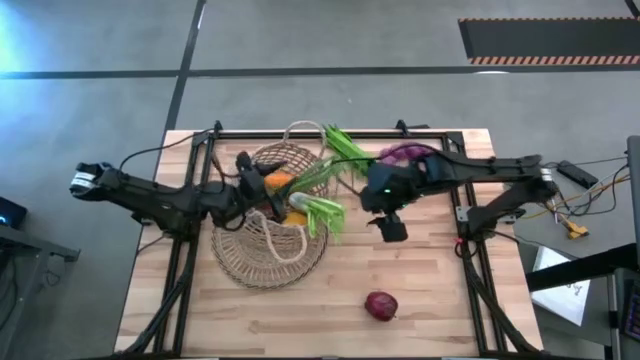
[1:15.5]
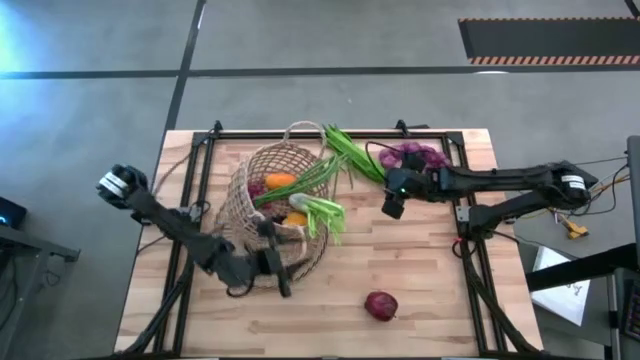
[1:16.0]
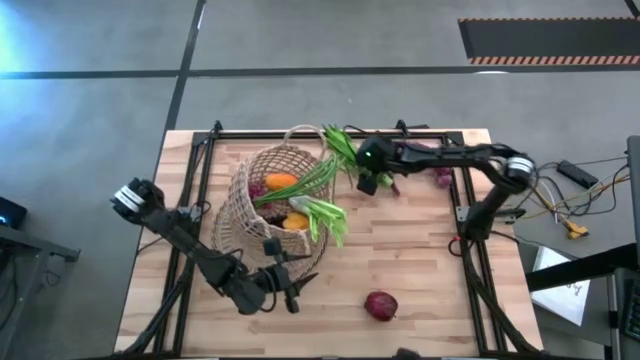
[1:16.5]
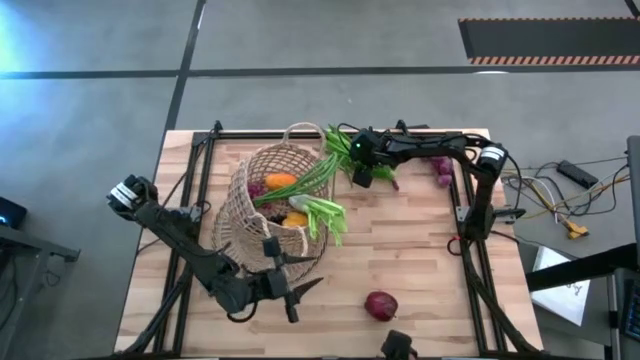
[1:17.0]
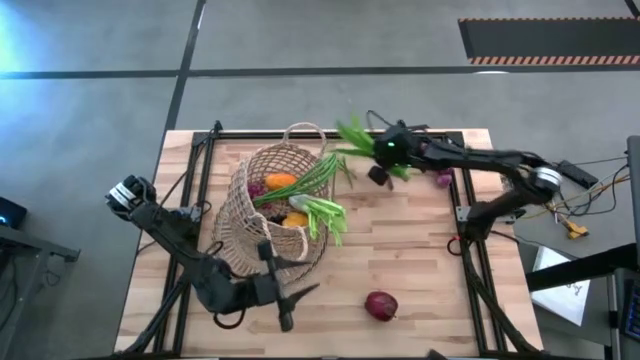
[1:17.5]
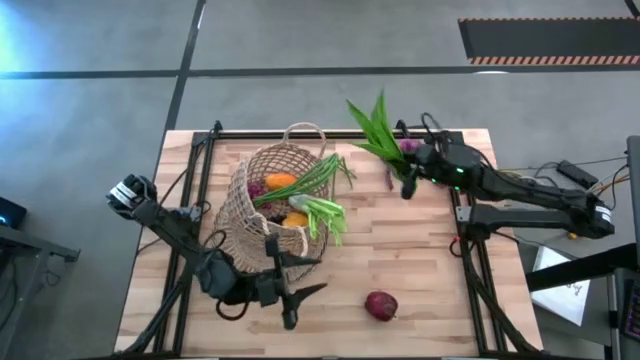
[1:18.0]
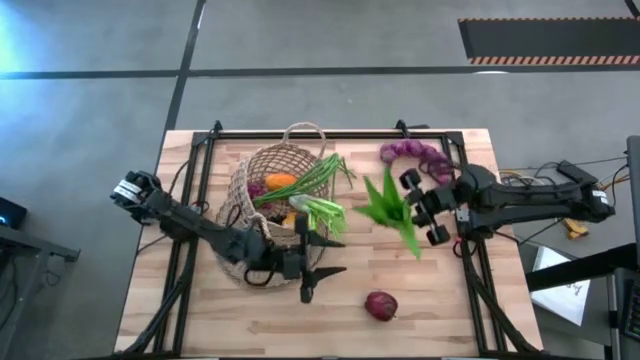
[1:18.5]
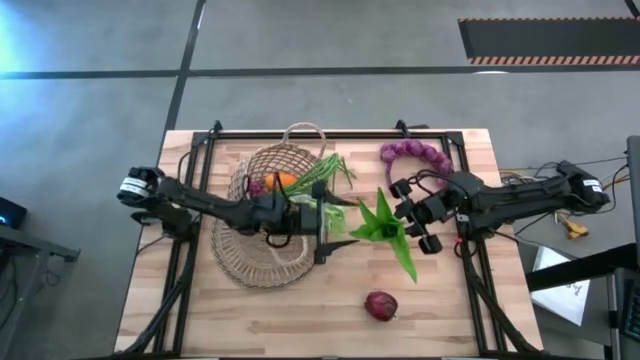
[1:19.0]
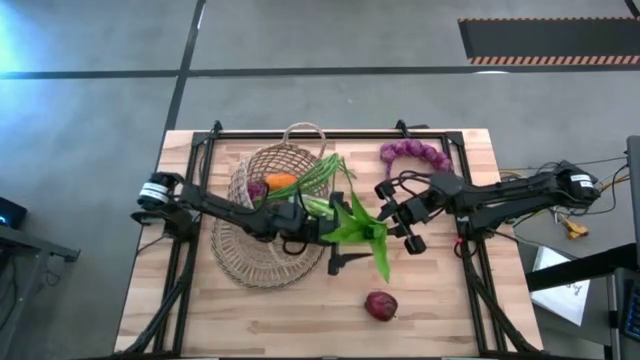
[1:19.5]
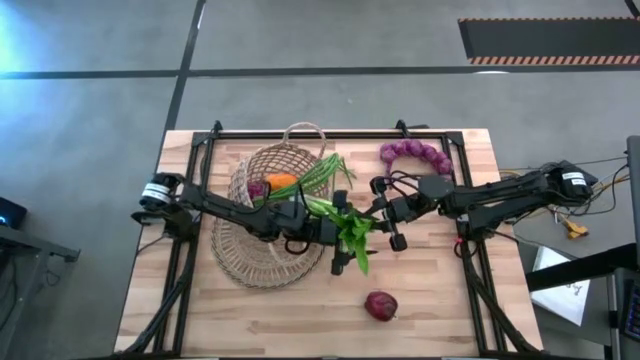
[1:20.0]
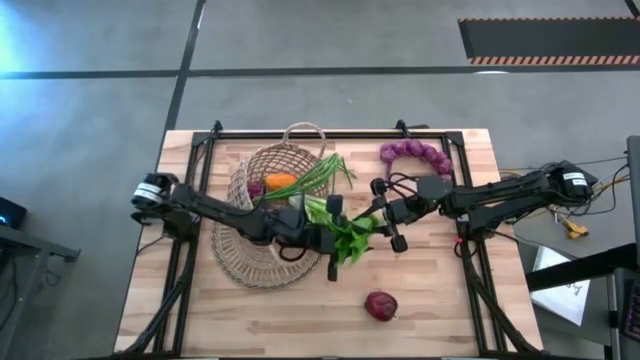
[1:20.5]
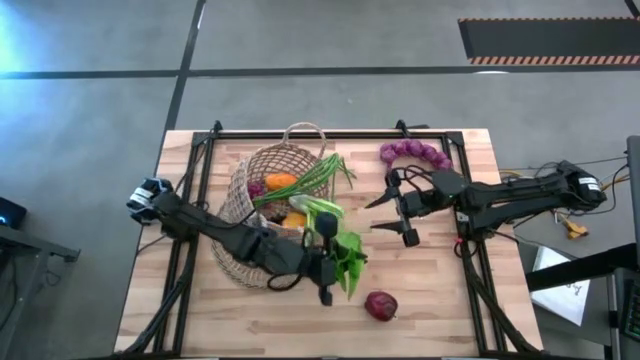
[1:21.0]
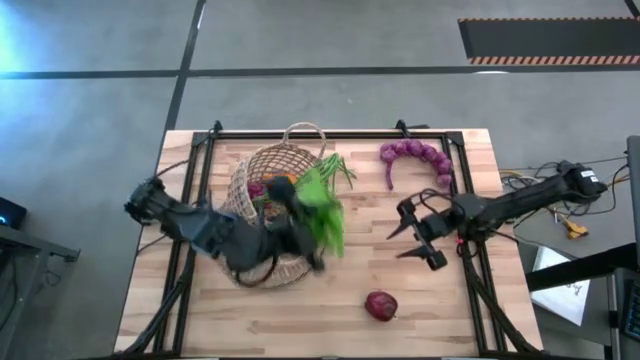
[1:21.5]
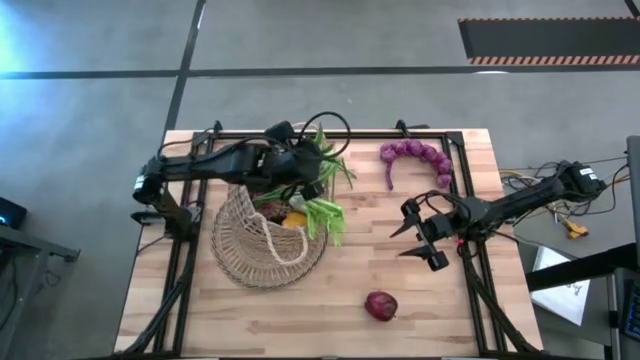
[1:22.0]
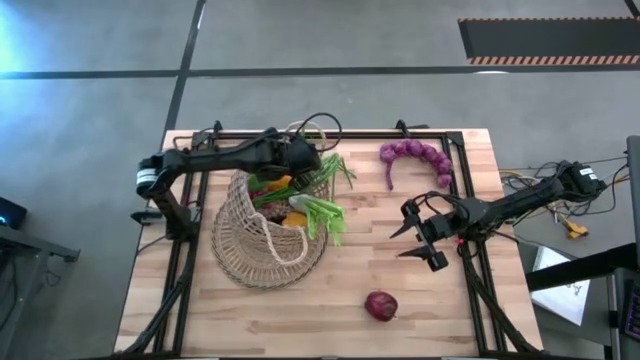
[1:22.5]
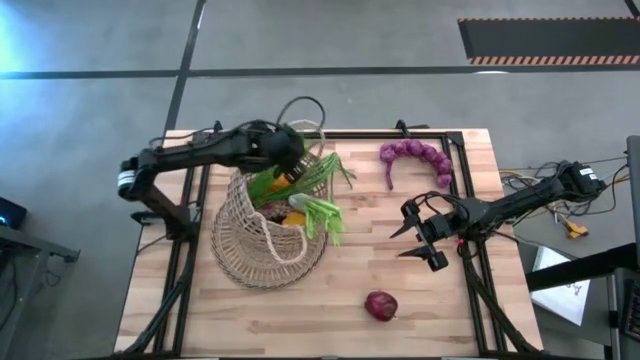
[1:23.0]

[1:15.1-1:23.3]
Task: Build produce basket
Put the lettuce into the basket

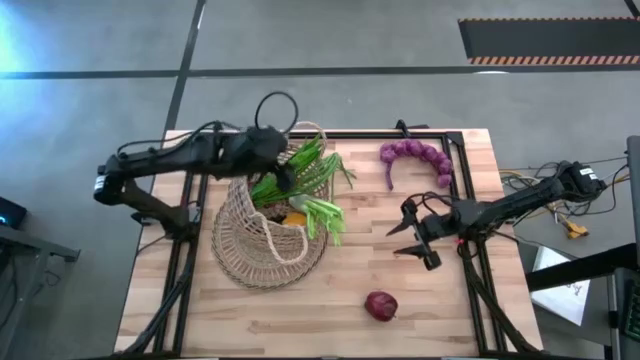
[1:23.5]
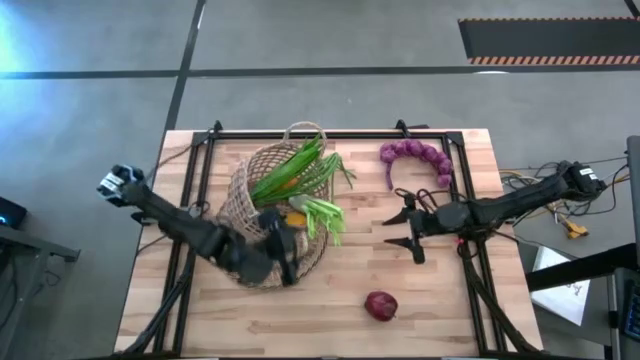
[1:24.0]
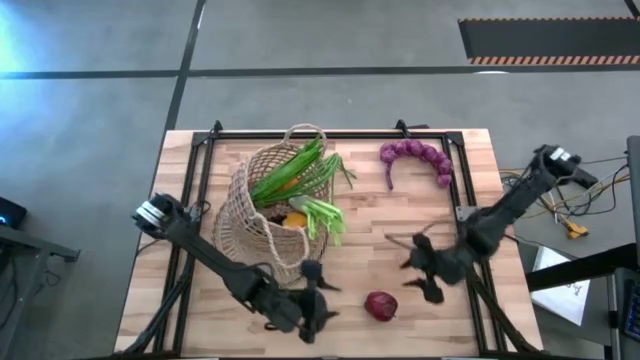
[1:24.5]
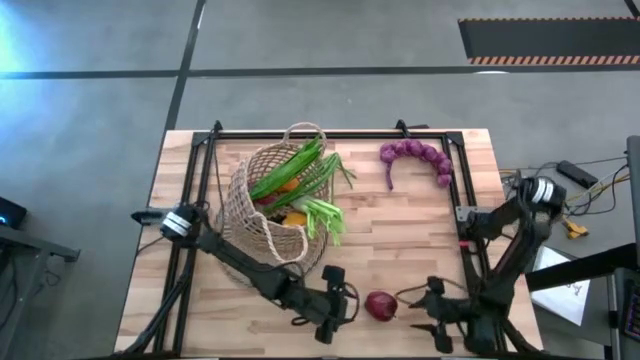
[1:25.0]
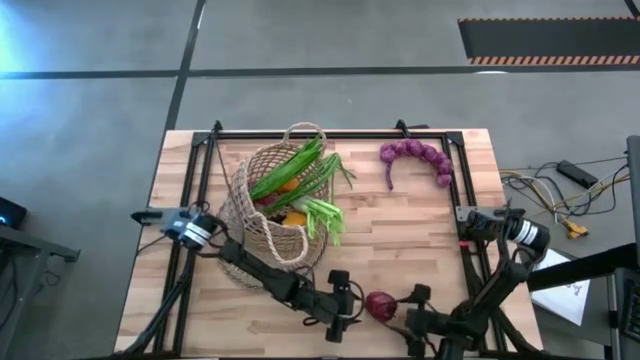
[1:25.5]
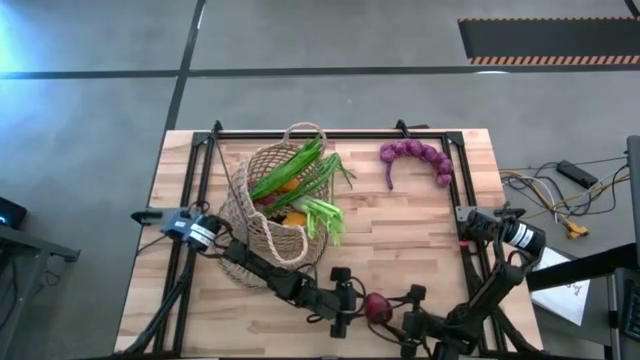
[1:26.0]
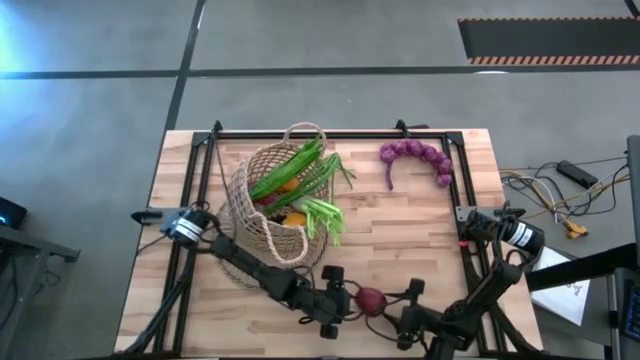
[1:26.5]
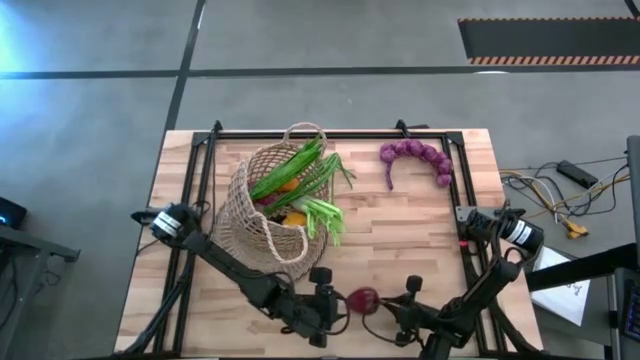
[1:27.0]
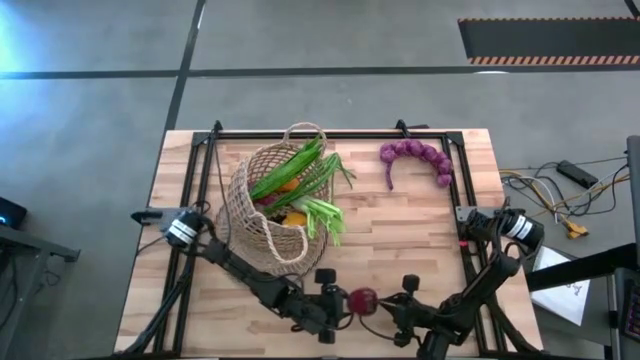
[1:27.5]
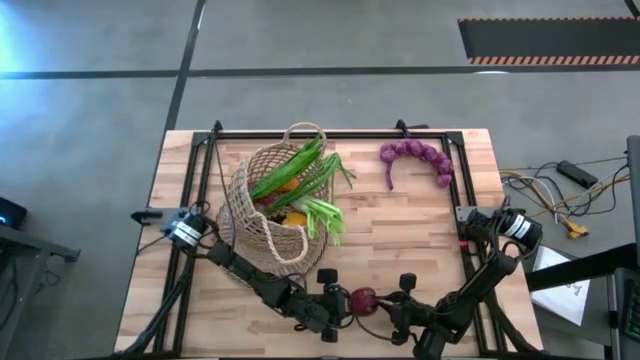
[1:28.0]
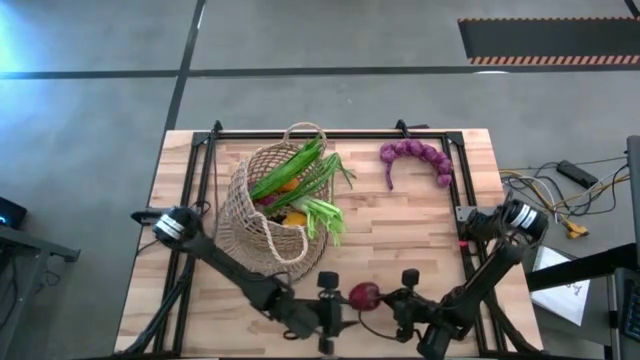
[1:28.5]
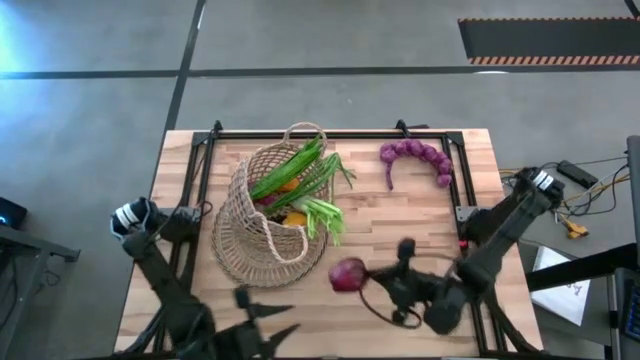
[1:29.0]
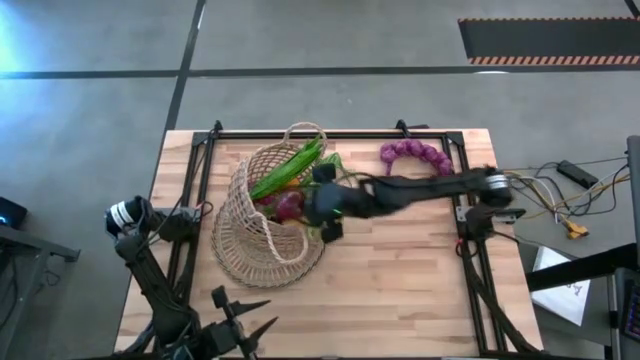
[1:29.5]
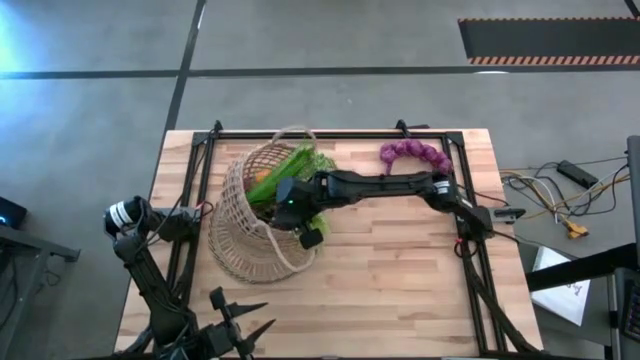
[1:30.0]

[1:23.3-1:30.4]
Put the apple into the basket

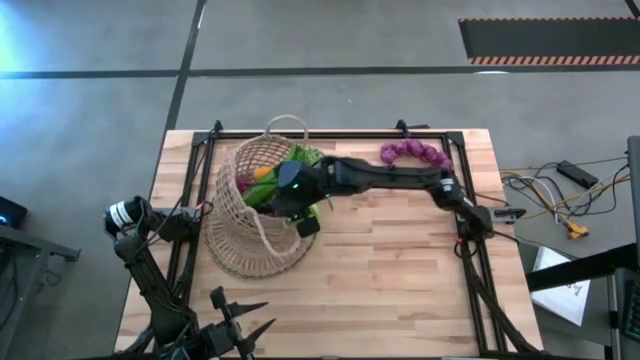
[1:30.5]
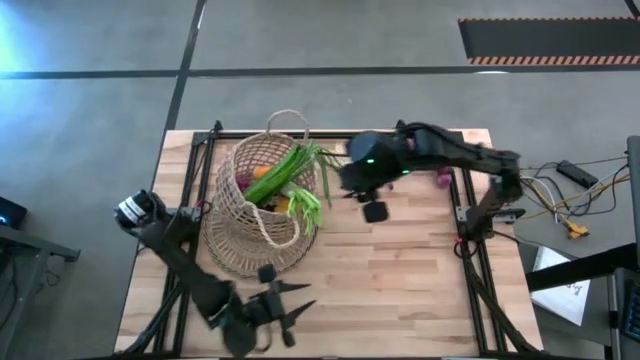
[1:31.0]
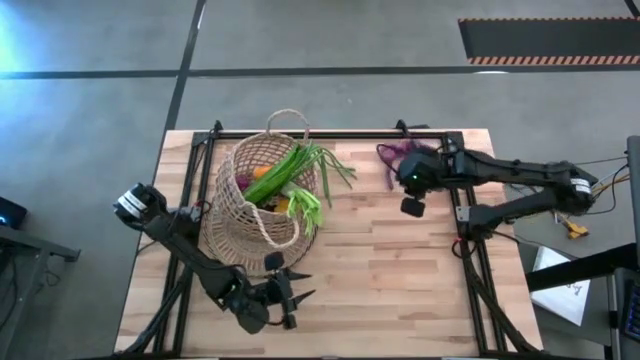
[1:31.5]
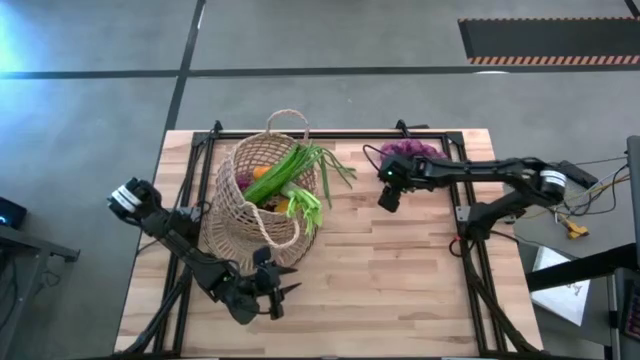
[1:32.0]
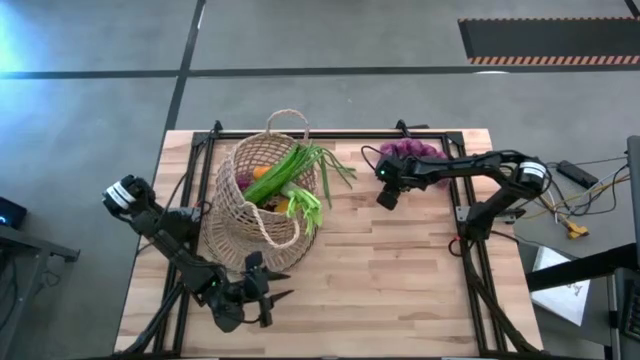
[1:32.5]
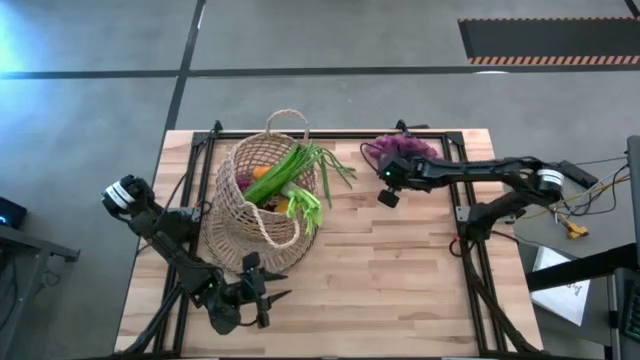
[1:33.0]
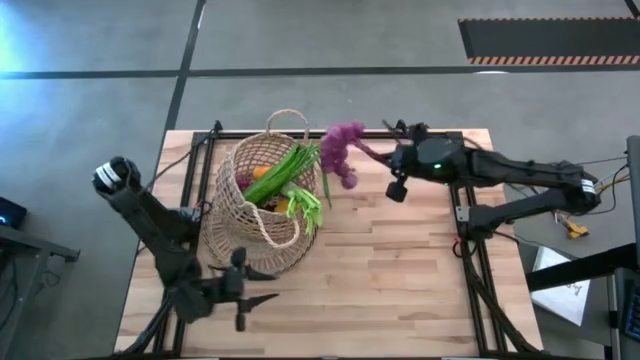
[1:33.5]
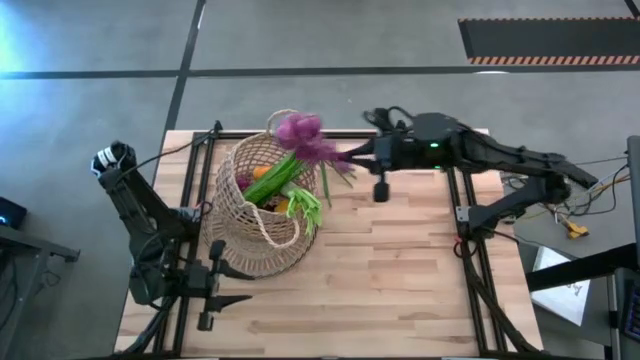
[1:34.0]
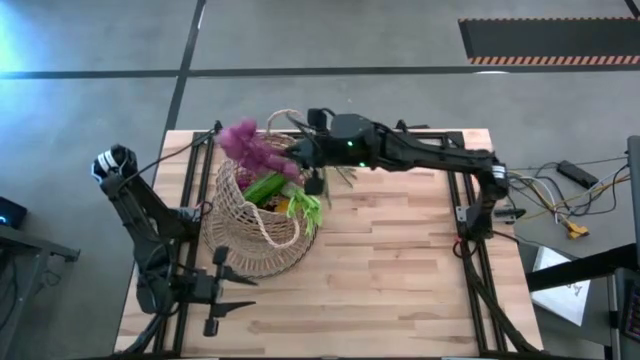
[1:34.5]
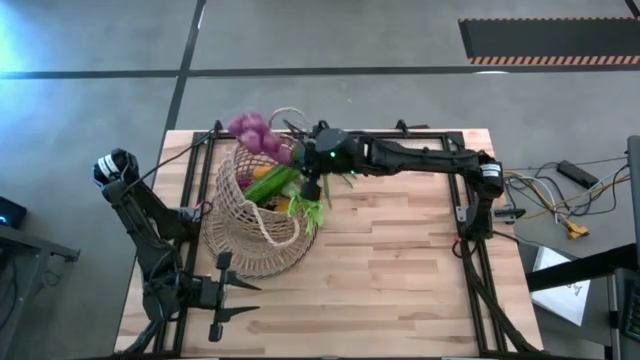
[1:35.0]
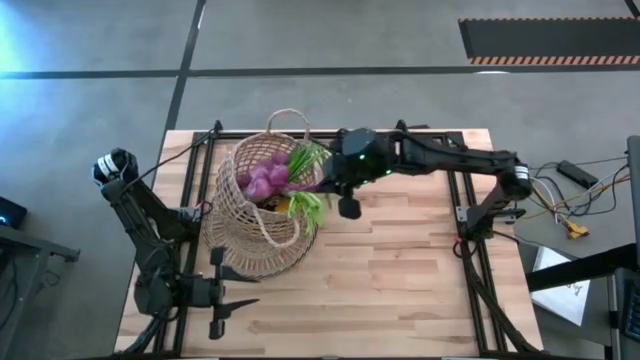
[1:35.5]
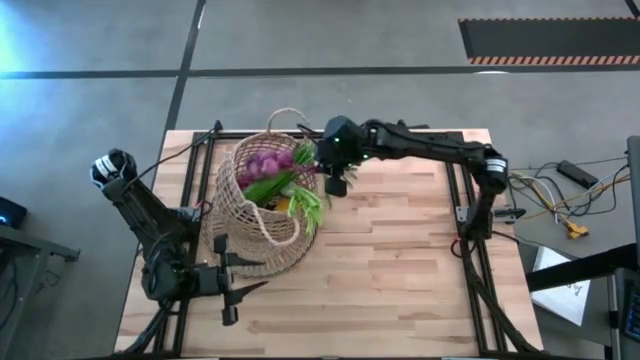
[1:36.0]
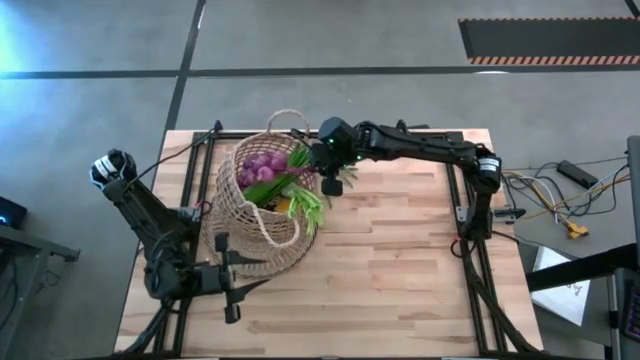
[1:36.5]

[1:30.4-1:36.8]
Put the garlic into the basket
